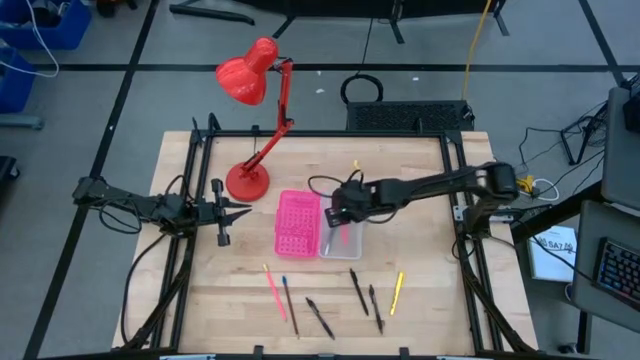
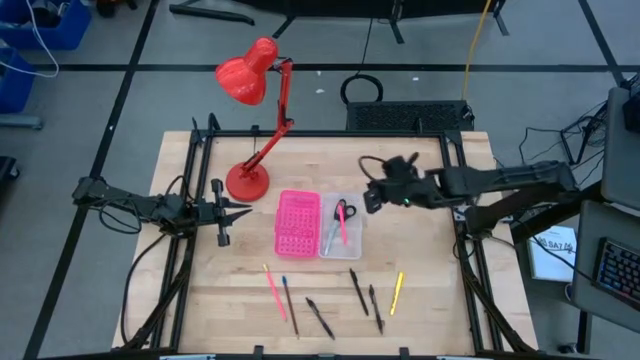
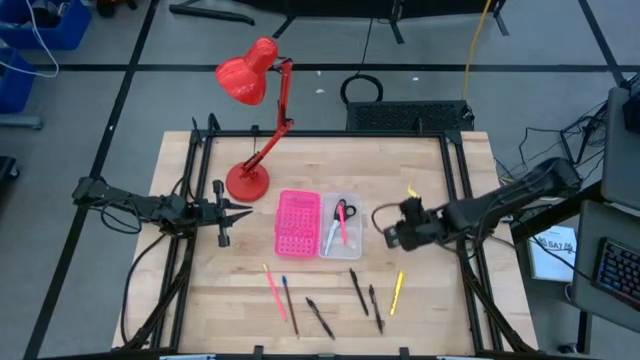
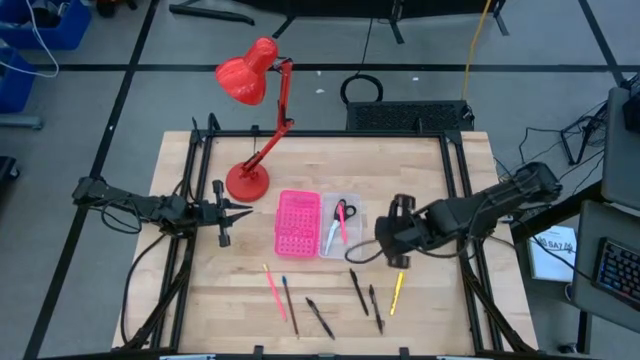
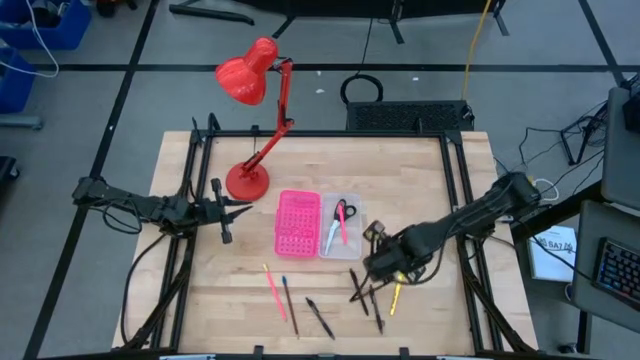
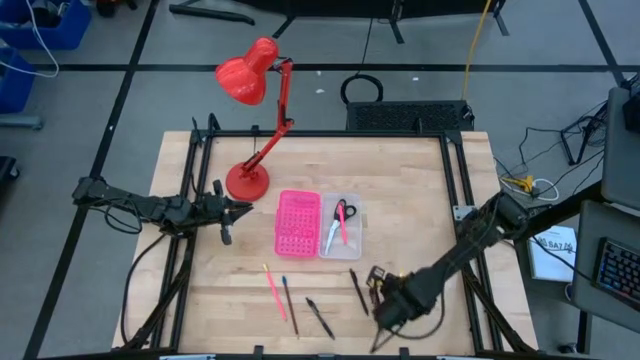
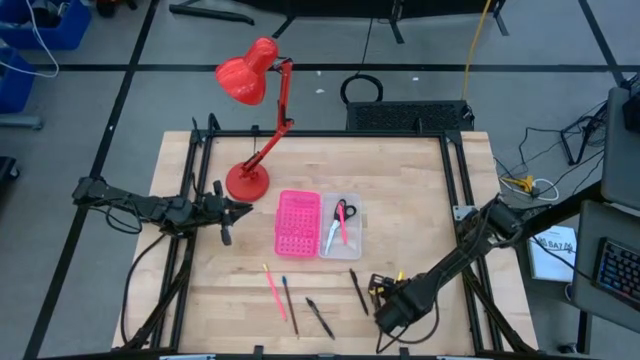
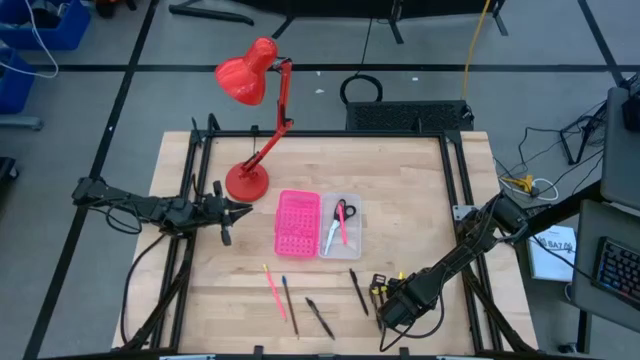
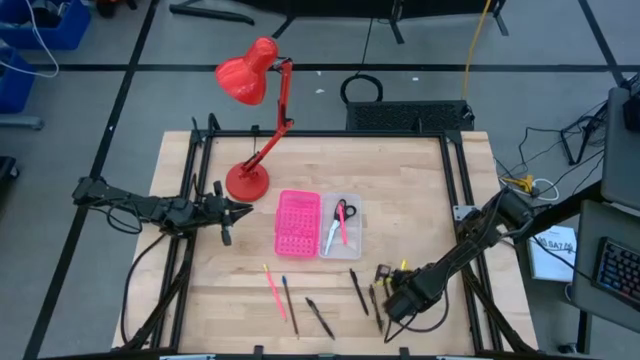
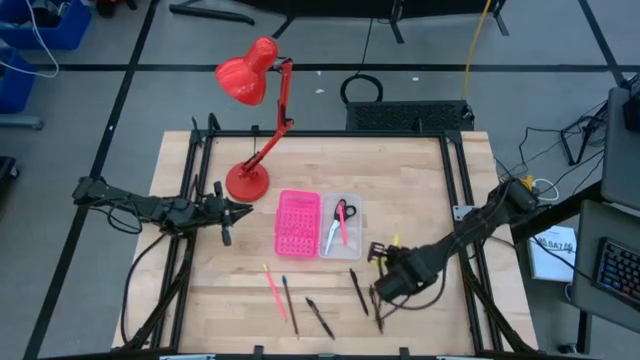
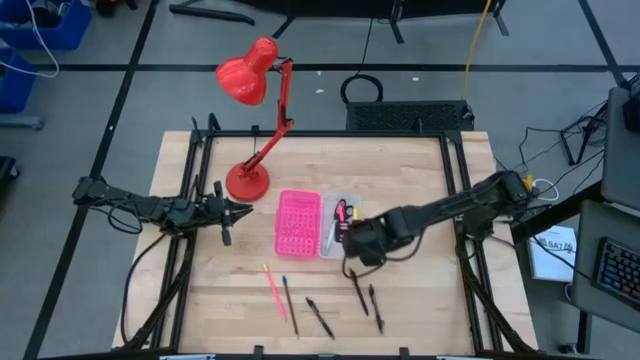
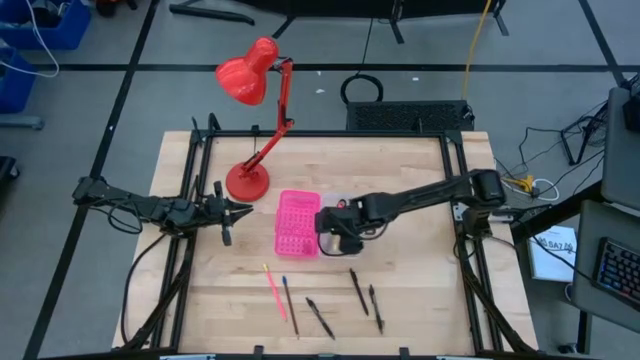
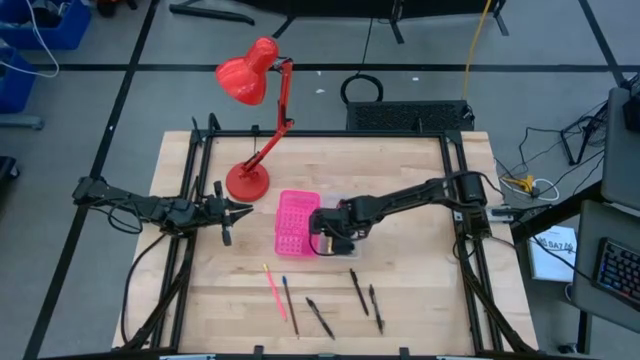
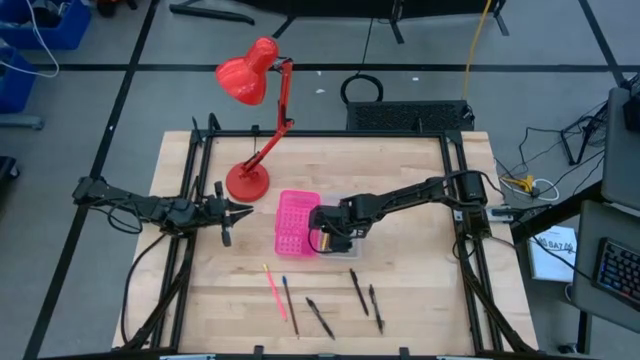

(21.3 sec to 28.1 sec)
Task: Pick & place school supplies into a supply box
Put the yellow pen into the supply box

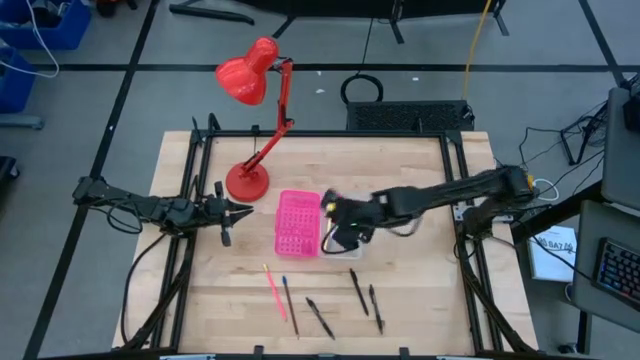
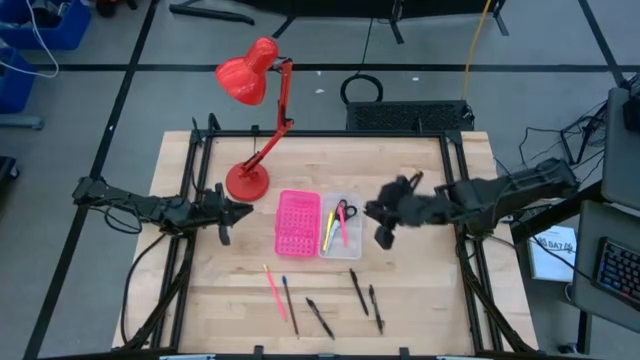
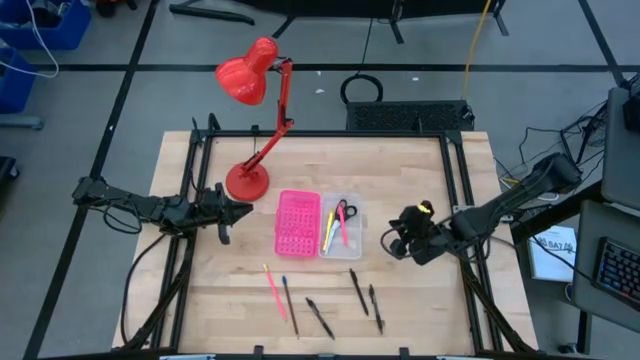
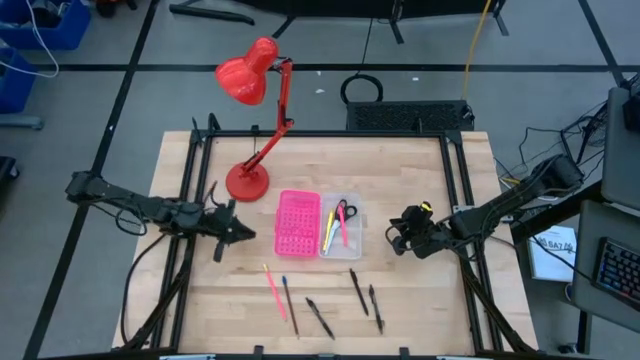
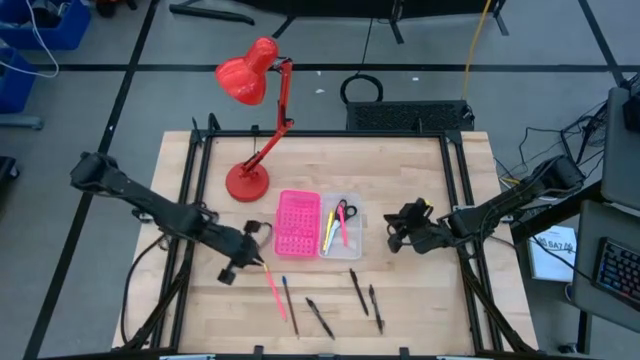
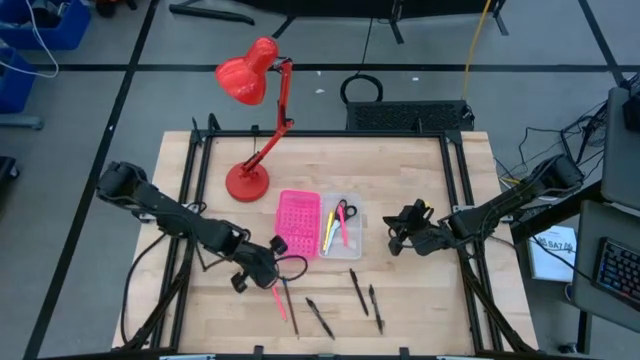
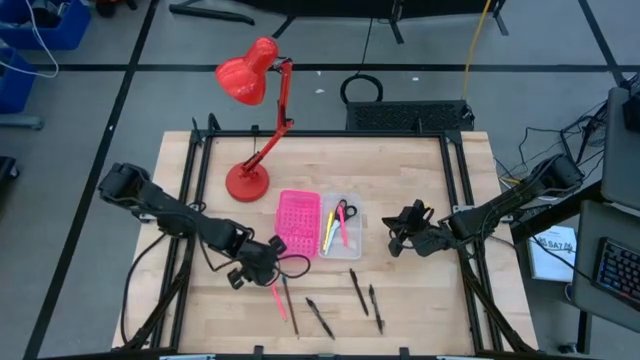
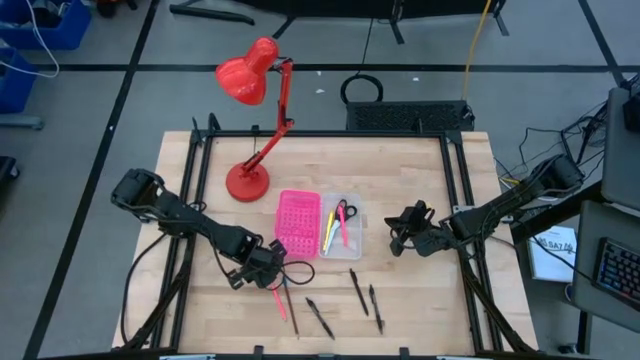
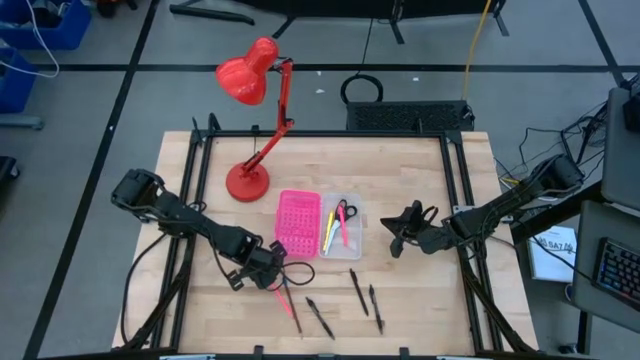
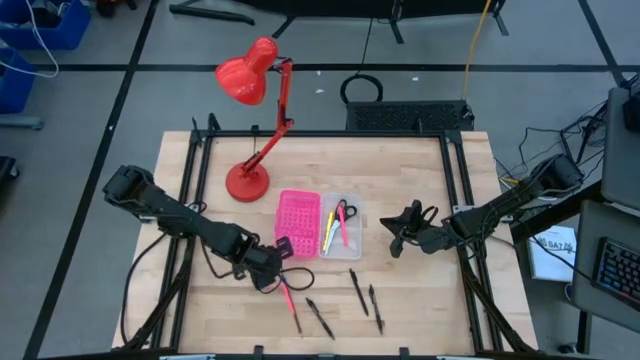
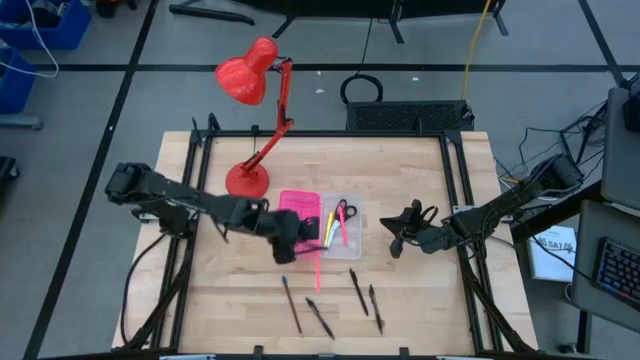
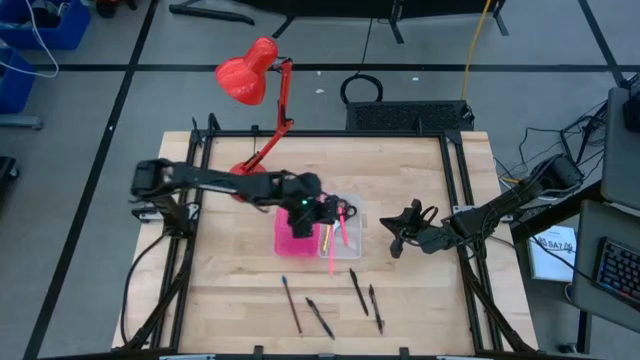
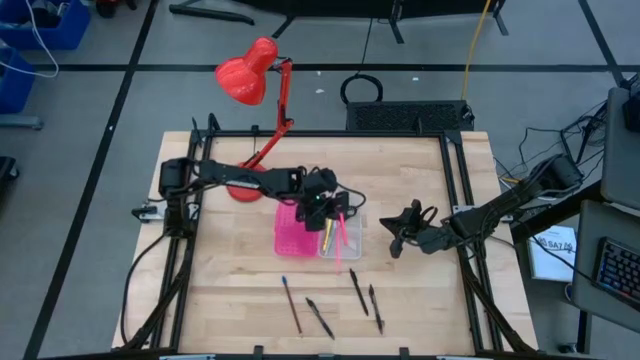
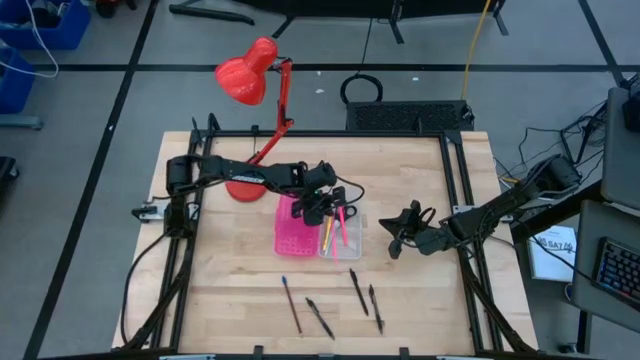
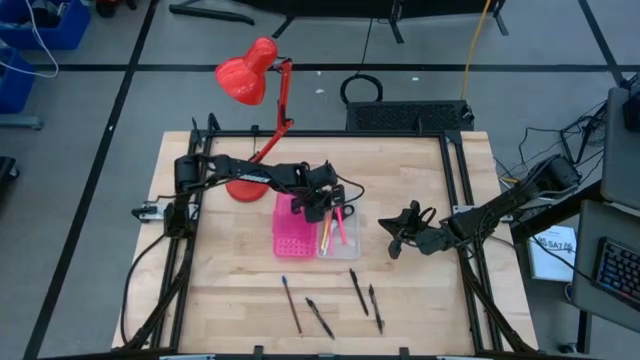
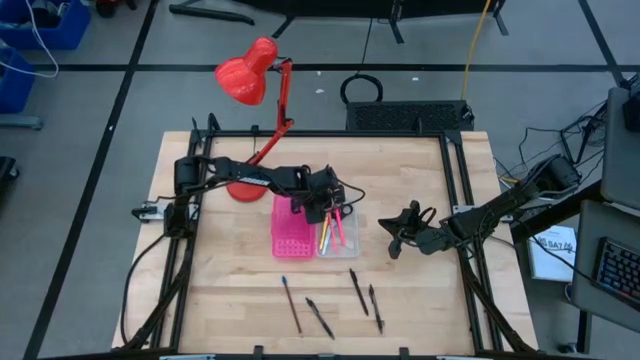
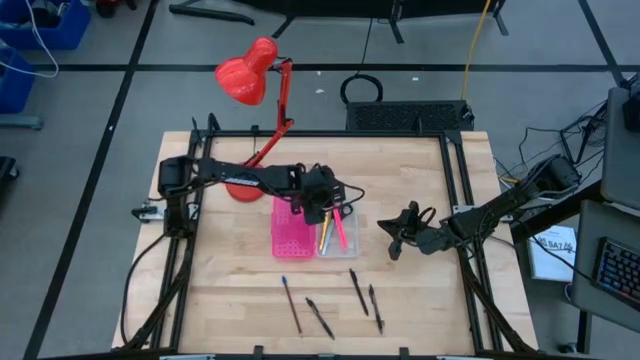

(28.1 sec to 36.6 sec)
Put the pink pencil into the supply box

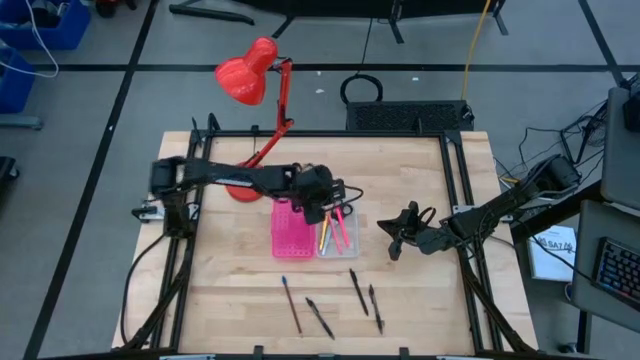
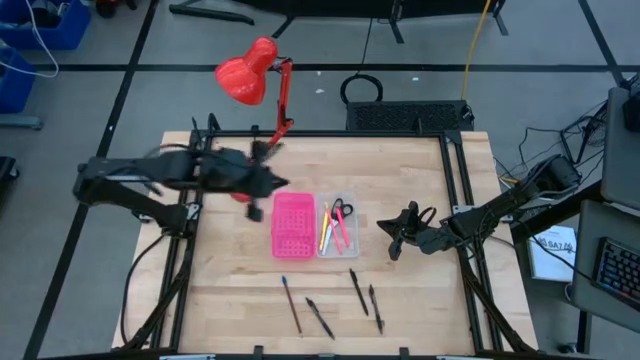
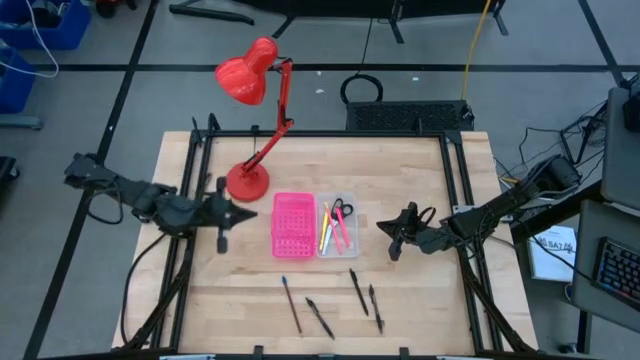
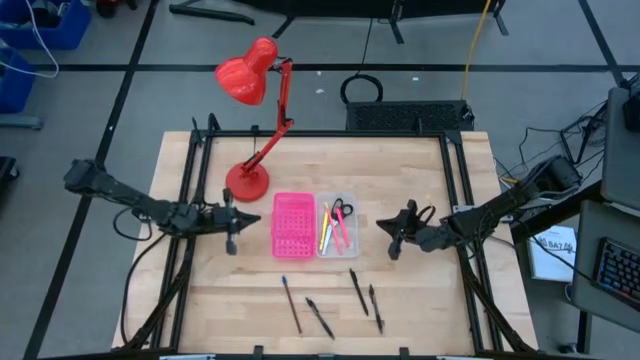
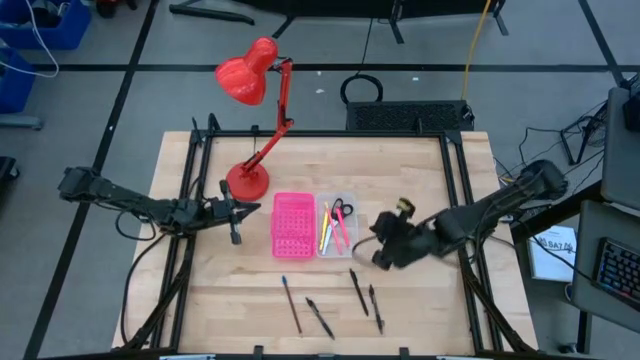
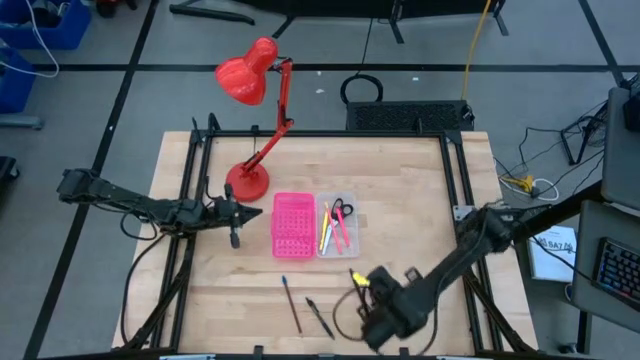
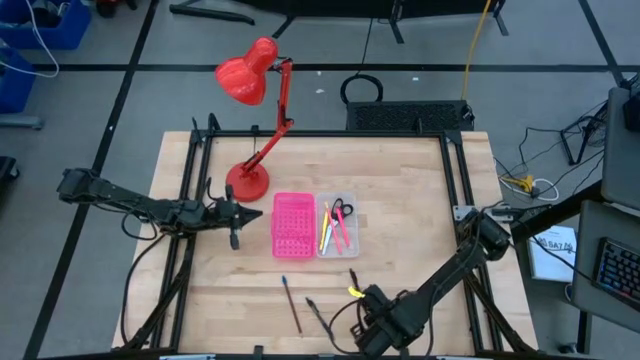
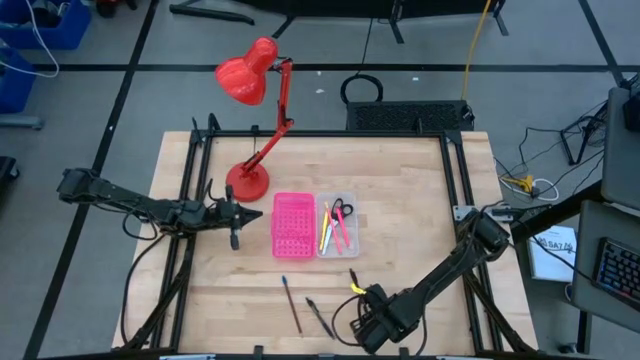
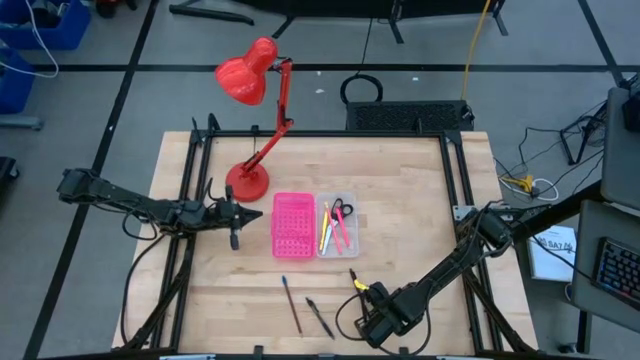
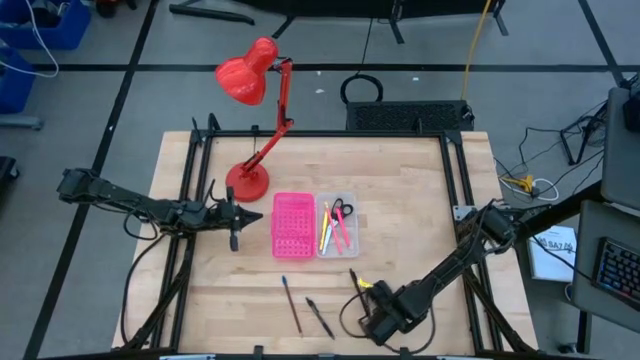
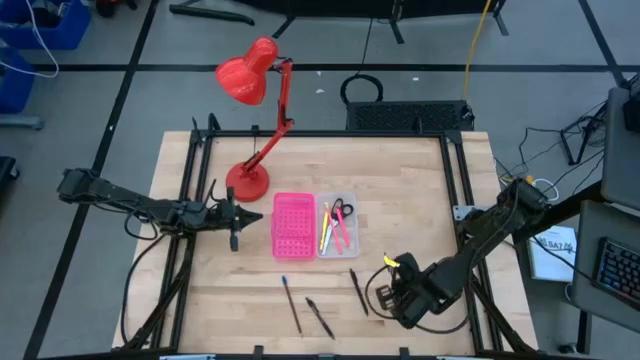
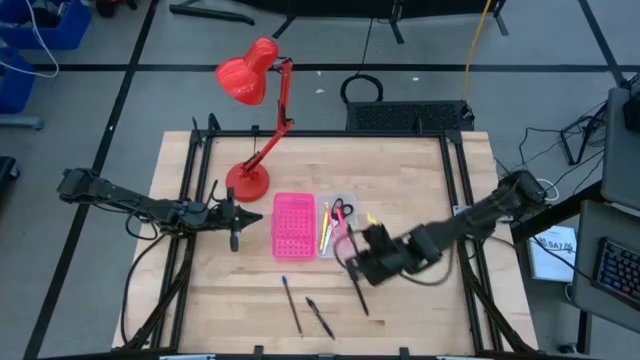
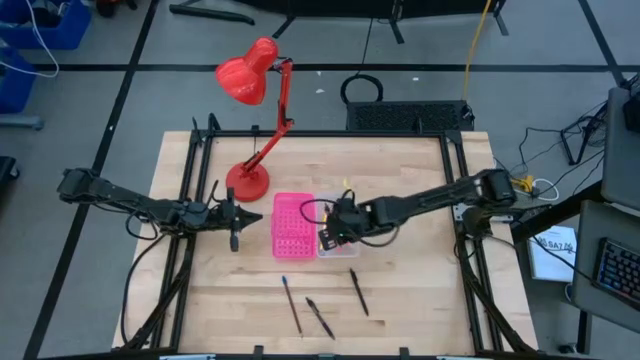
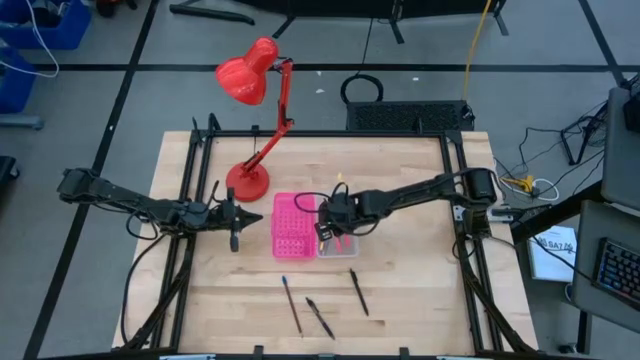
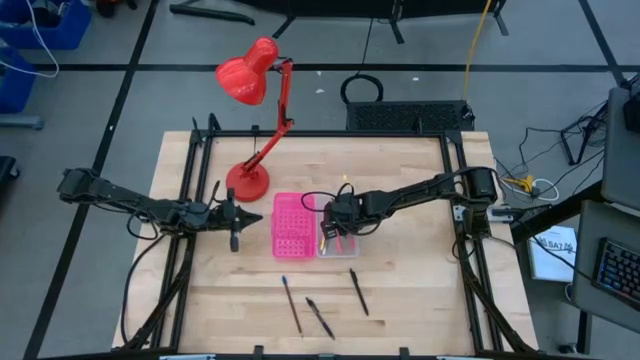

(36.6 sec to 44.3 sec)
Put the right black pen into the supply box
